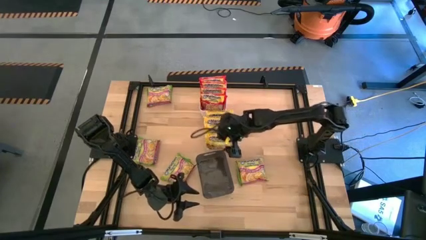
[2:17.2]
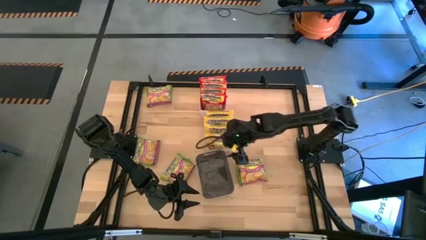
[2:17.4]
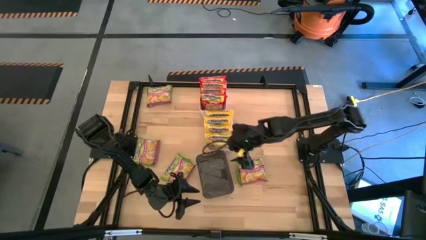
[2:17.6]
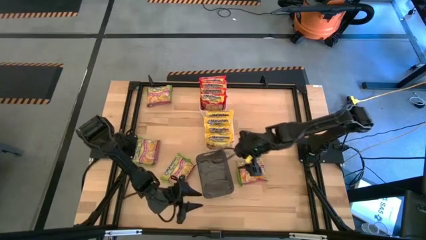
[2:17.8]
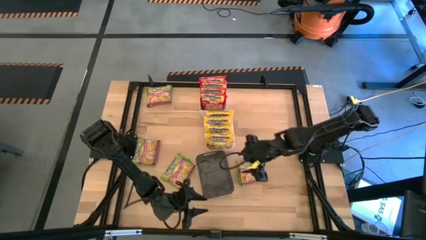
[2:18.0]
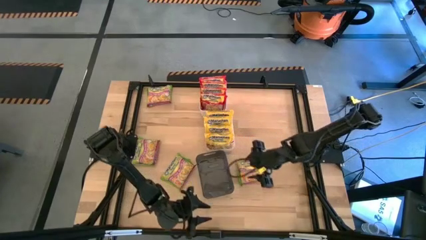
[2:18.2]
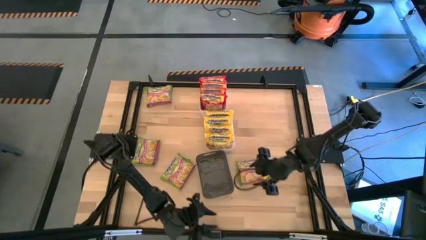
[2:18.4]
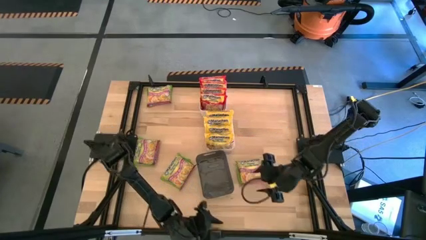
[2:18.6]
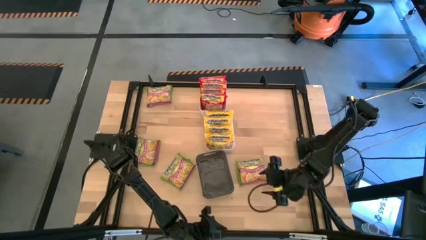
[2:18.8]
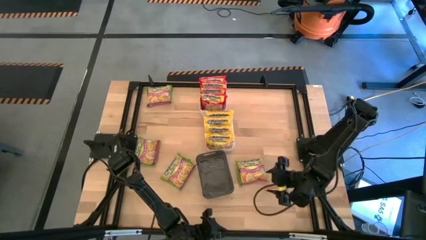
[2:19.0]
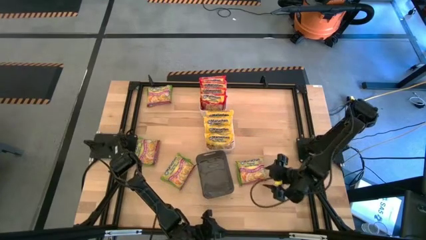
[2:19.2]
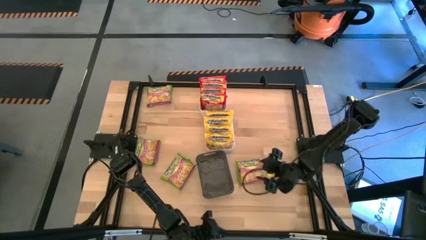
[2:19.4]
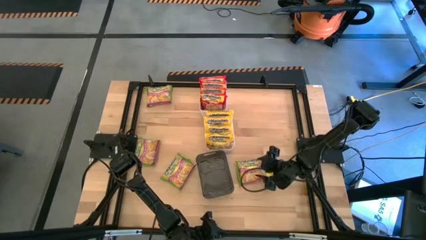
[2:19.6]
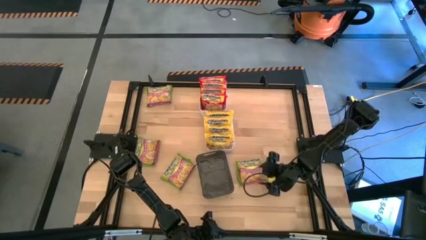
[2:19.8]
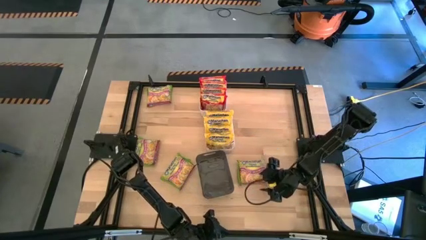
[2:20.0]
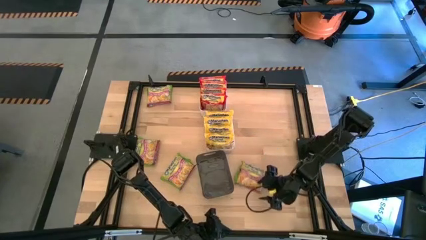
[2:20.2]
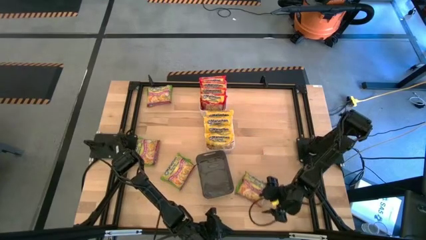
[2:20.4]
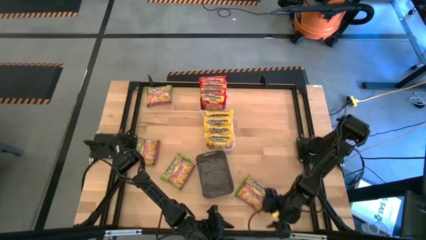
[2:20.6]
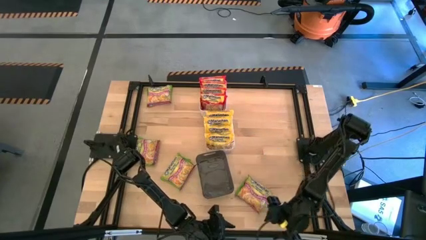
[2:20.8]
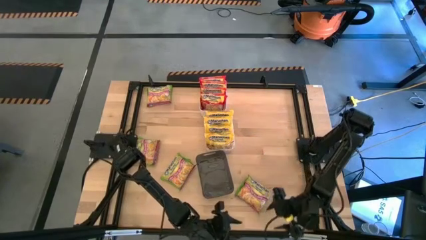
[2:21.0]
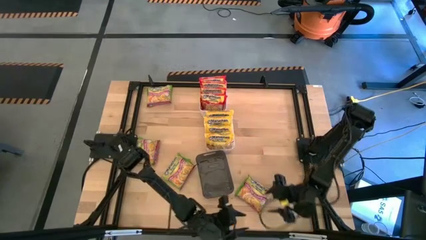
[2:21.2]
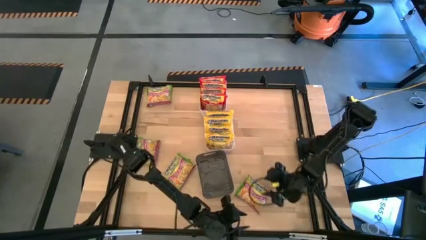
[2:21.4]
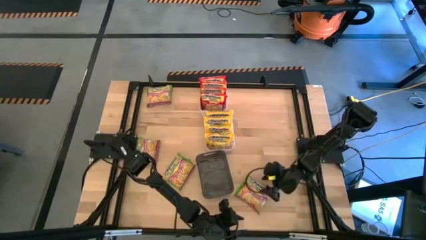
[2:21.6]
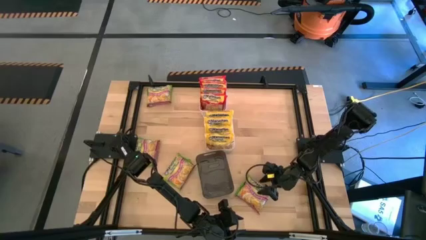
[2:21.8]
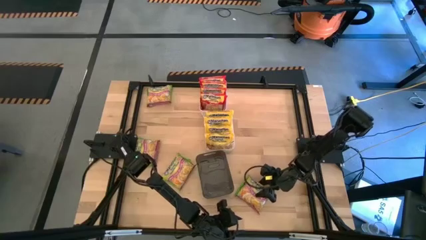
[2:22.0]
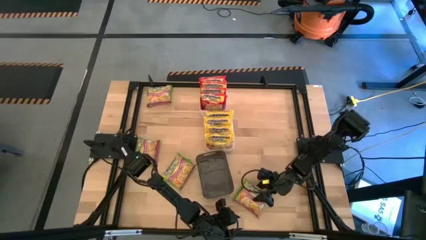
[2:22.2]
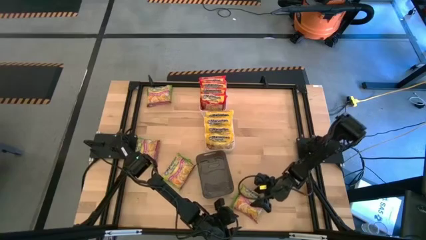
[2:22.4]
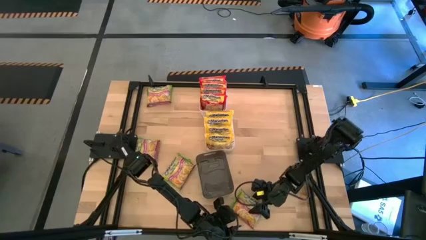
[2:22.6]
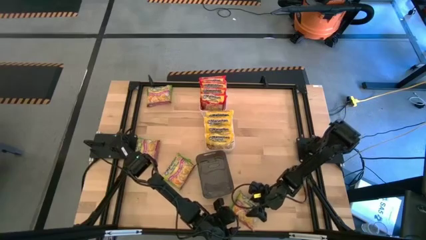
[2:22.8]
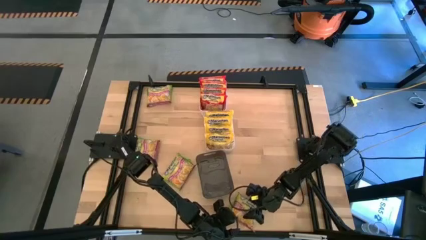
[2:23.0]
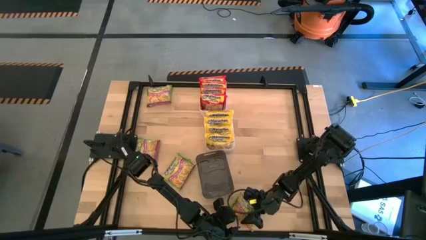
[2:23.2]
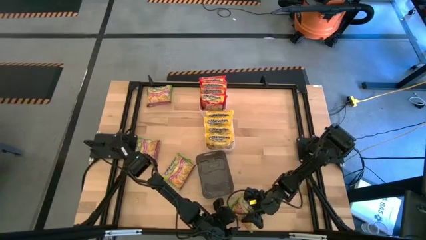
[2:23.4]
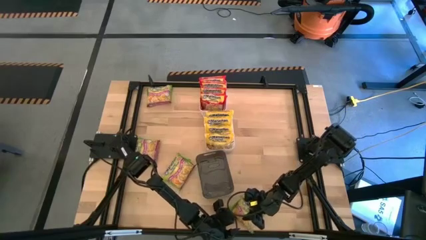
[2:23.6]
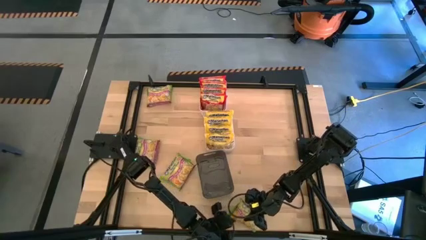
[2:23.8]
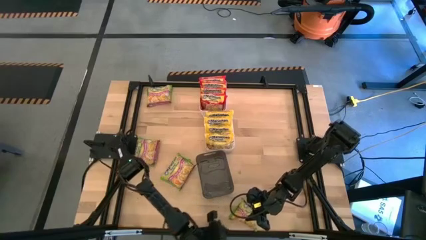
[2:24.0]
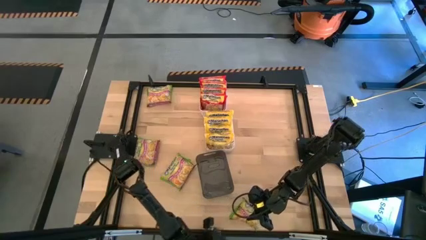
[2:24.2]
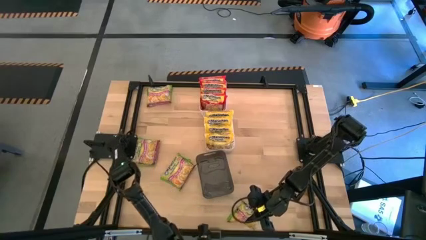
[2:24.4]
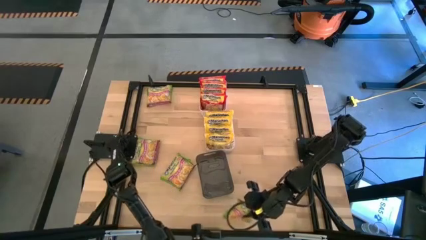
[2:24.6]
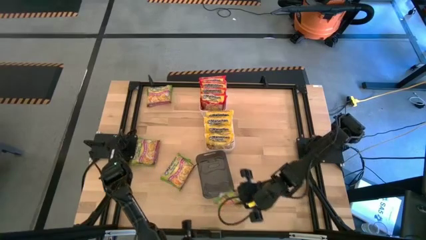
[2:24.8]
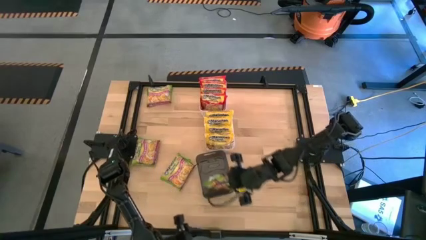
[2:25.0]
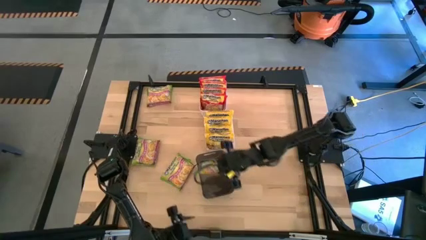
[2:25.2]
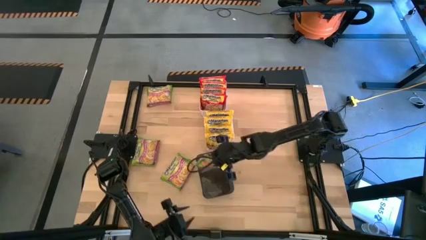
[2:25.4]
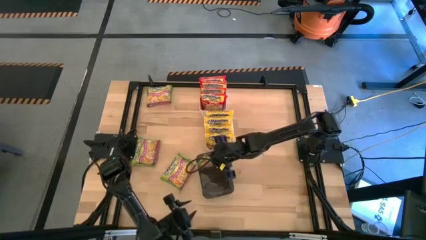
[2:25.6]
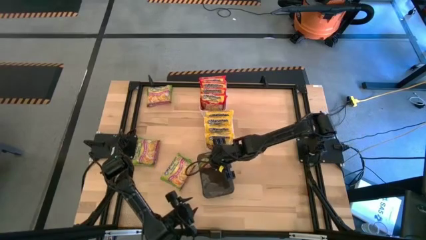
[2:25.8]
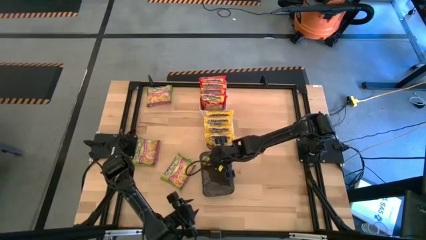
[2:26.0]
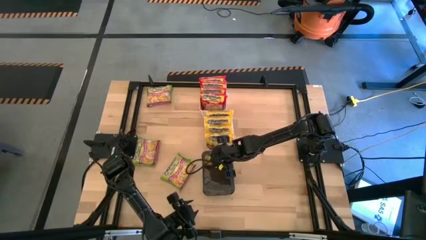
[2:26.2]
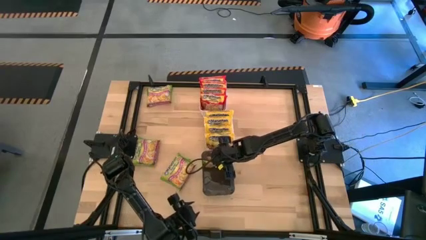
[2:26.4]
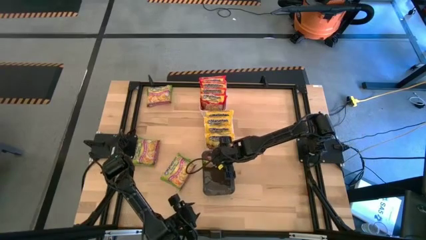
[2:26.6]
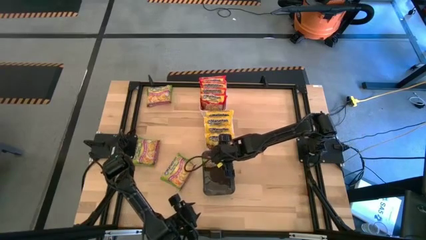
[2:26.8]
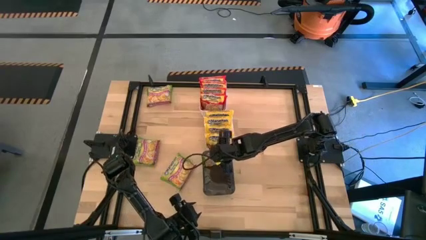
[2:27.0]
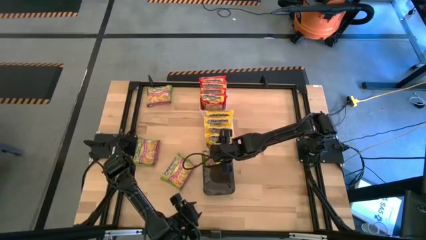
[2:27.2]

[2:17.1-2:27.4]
Task: Sort Maruchan noodles
Put the green noodle pack into the black bin

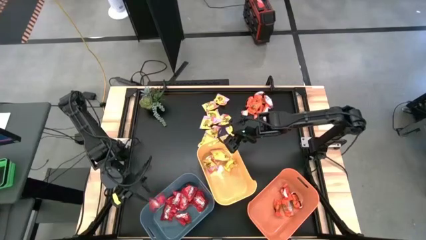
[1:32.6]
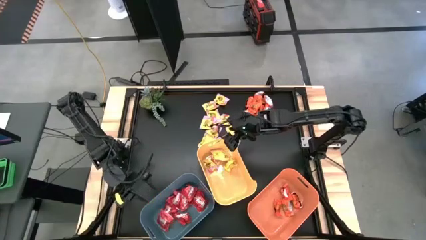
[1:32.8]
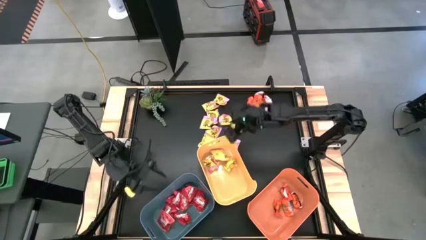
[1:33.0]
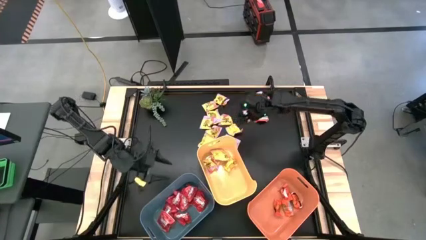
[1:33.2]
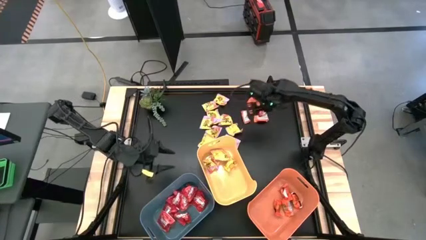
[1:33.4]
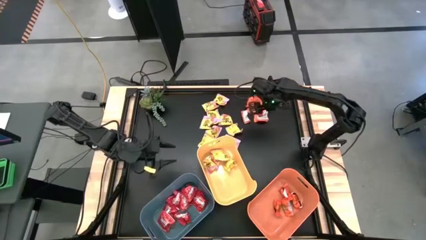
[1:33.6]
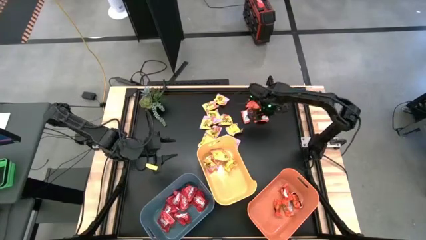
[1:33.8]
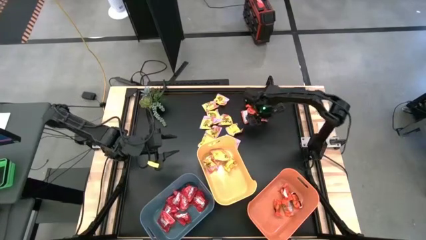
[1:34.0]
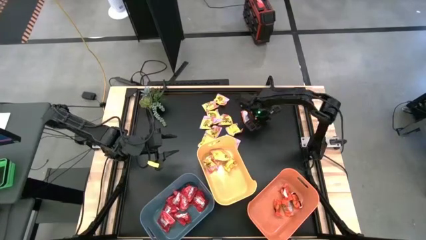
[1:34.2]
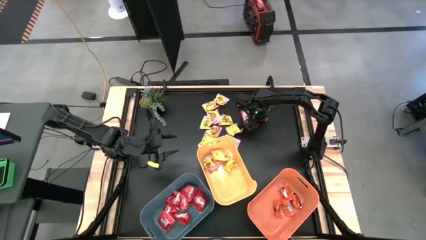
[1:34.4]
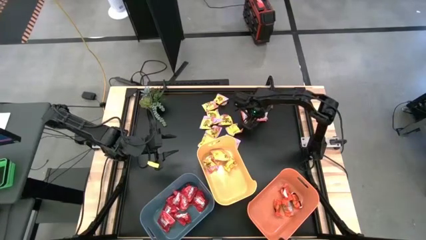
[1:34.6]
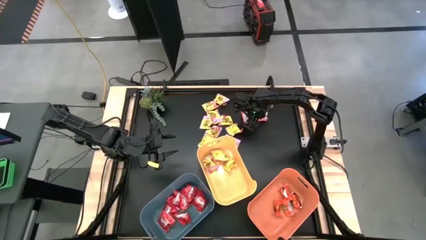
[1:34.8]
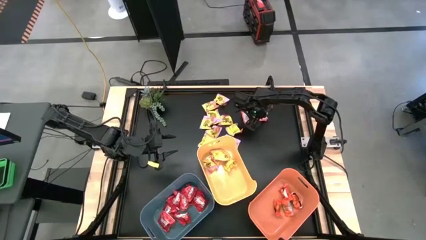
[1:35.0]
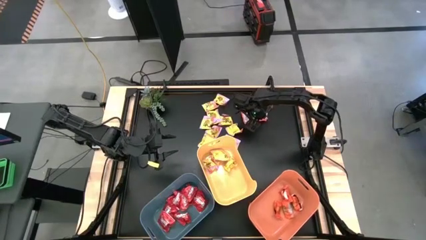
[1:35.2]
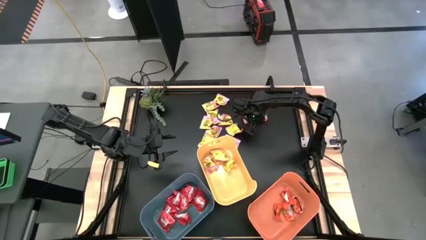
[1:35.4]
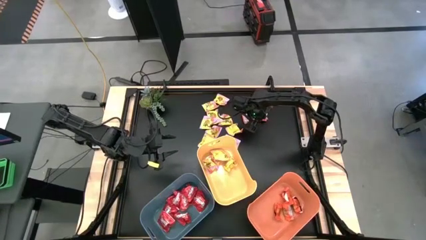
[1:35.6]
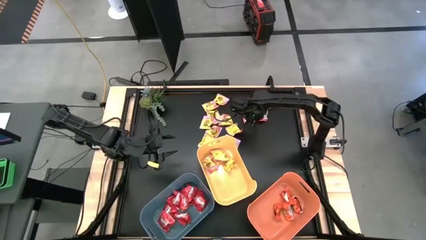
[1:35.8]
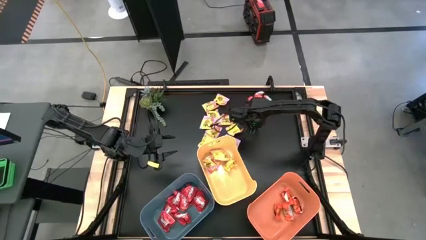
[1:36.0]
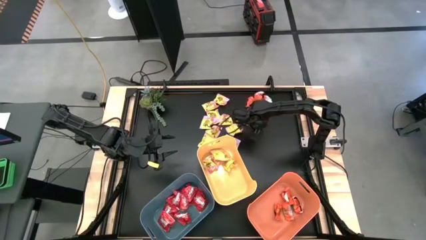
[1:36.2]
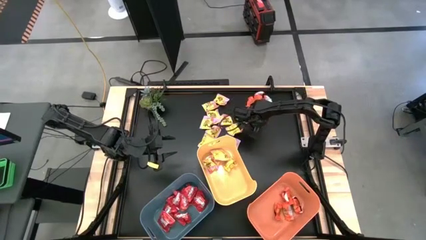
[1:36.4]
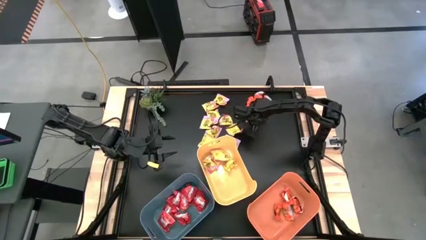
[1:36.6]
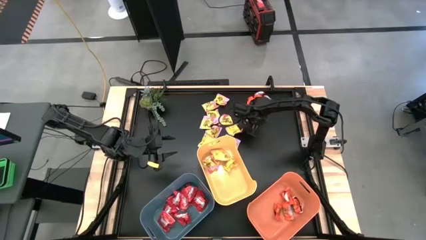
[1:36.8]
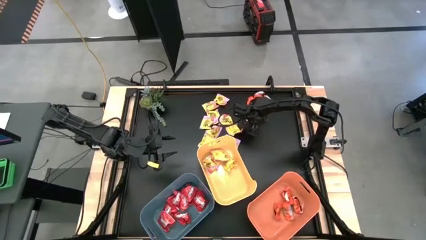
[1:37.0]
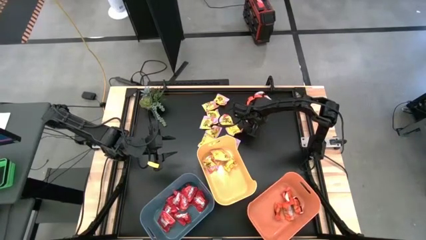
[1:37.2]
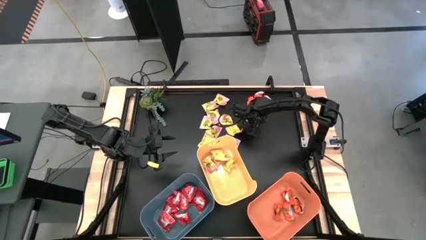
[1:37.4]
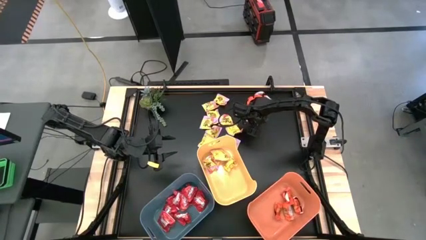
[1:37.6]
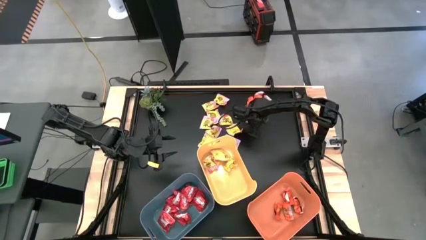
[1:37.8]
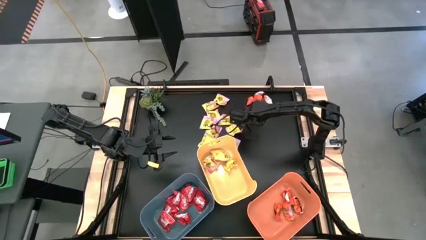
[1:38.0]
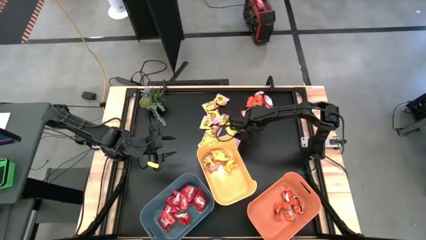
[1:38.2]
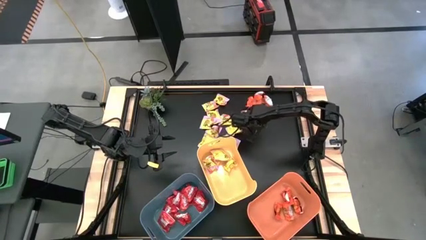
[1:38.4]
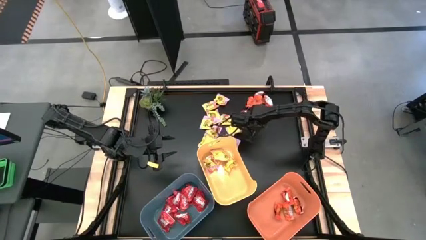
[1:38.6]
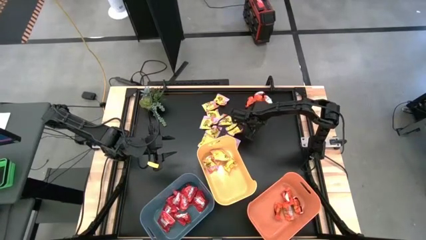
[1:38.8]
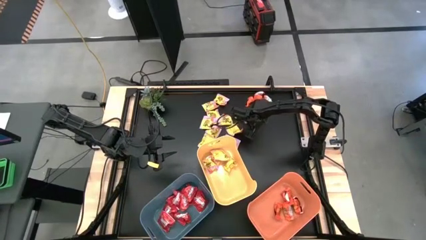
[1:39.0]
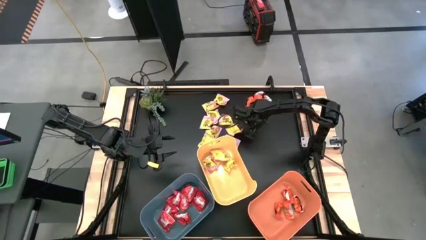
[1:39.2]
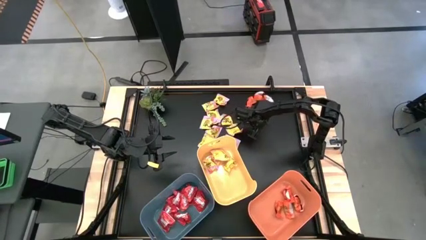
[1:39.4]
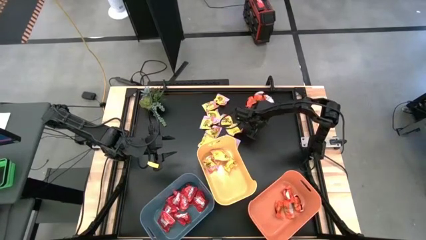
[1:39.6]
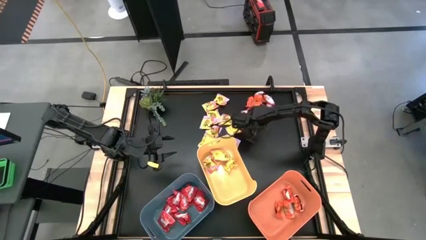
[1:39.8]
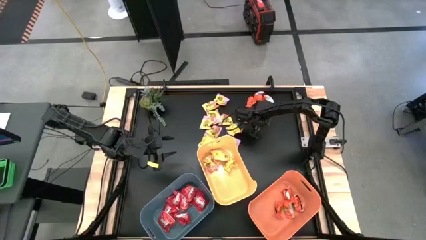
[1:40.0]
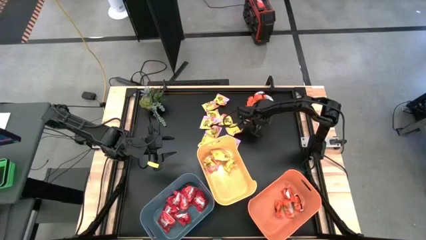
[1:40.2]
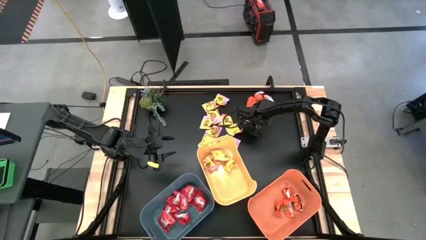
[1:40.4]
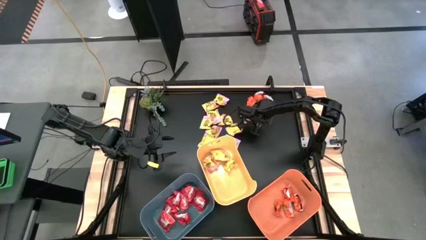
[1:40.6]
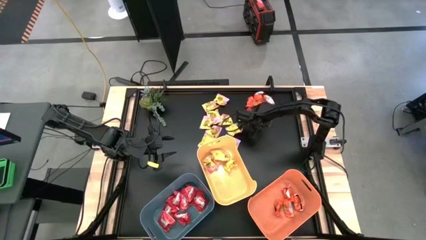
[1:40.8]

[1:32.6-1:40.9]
Task: Sort candy
Put the orange chocolate into the orange bin
